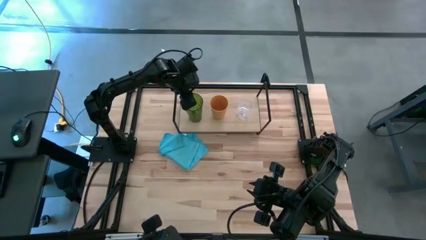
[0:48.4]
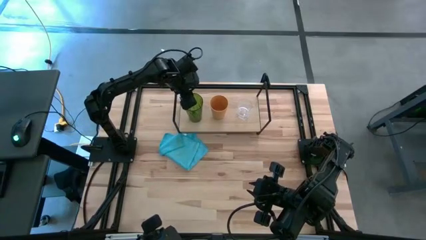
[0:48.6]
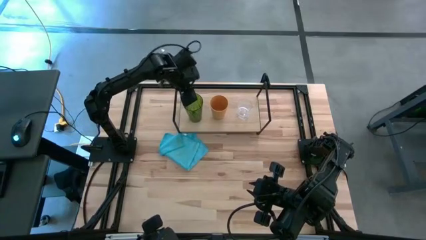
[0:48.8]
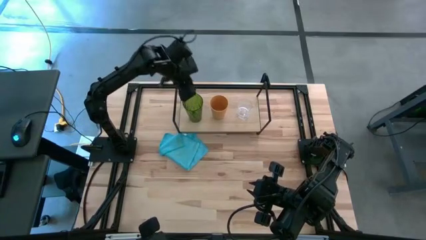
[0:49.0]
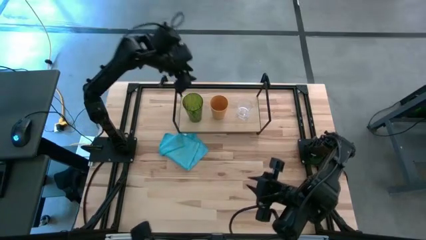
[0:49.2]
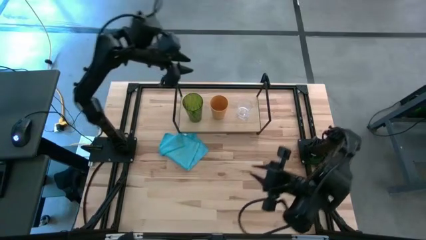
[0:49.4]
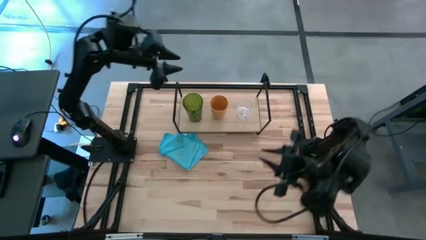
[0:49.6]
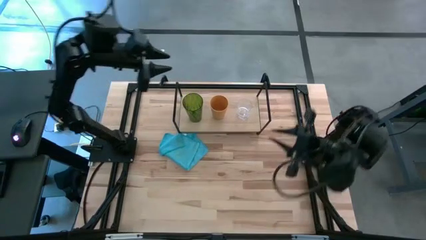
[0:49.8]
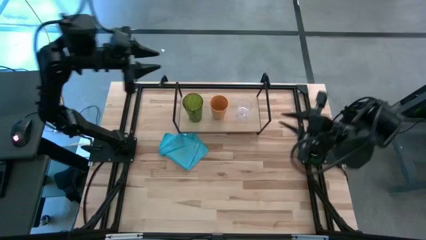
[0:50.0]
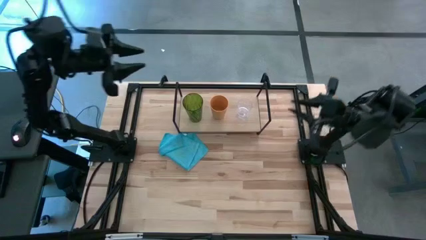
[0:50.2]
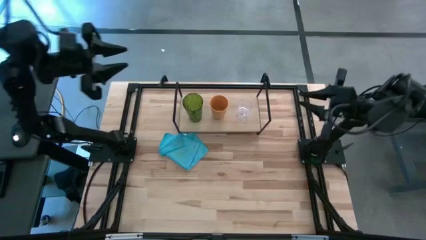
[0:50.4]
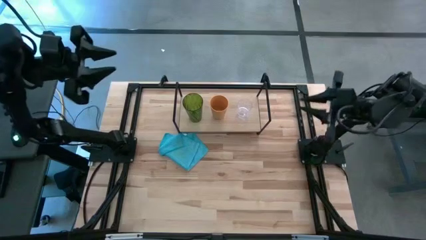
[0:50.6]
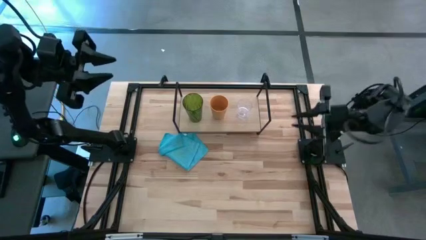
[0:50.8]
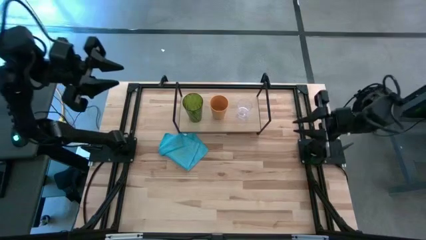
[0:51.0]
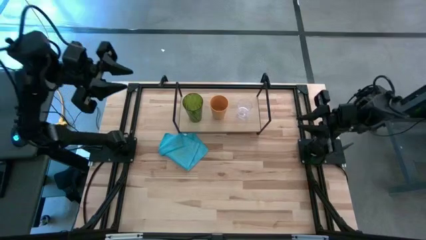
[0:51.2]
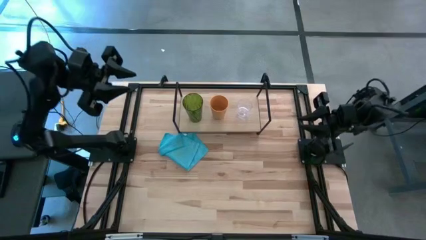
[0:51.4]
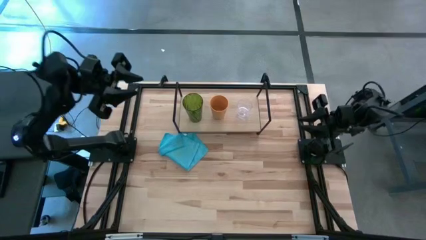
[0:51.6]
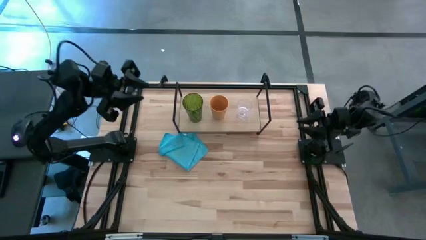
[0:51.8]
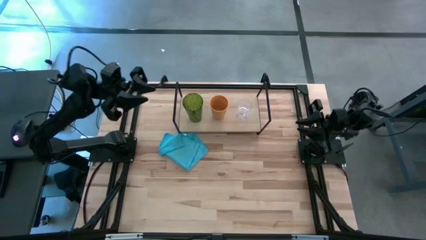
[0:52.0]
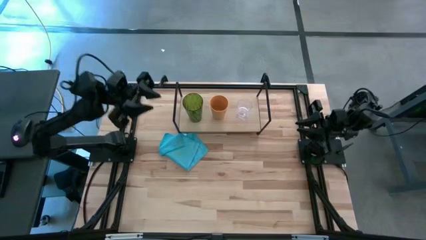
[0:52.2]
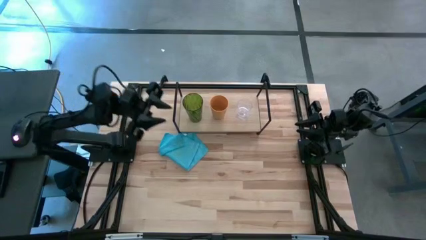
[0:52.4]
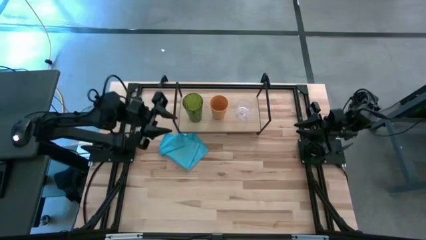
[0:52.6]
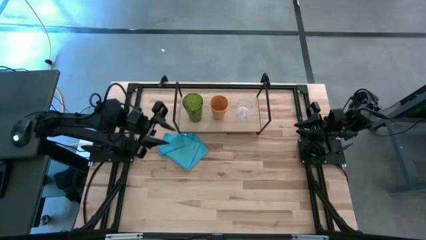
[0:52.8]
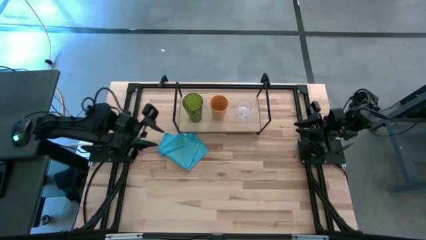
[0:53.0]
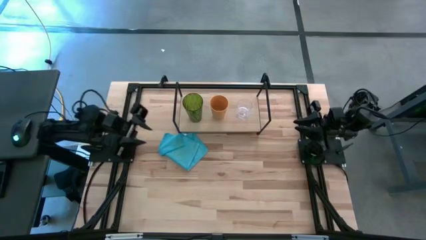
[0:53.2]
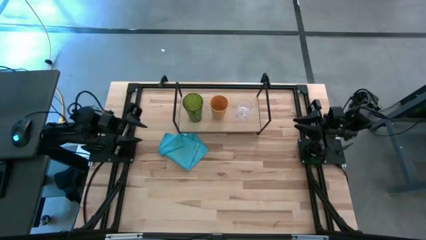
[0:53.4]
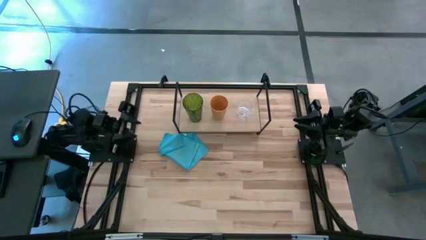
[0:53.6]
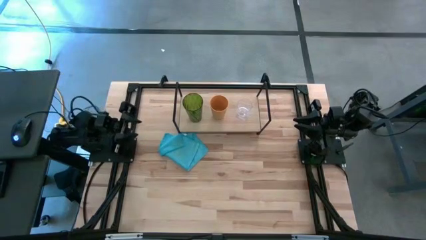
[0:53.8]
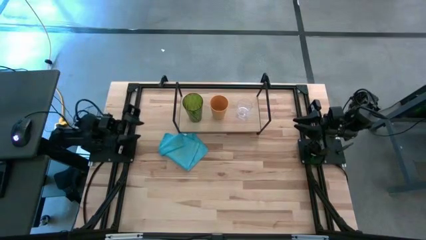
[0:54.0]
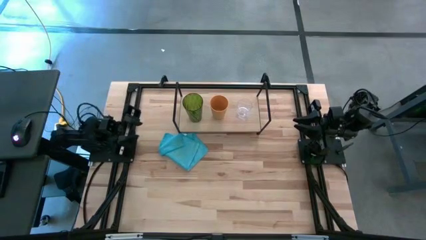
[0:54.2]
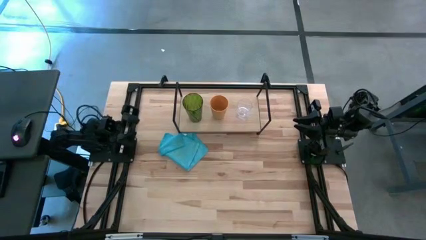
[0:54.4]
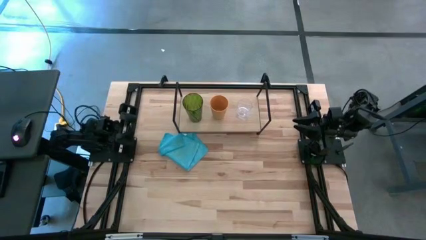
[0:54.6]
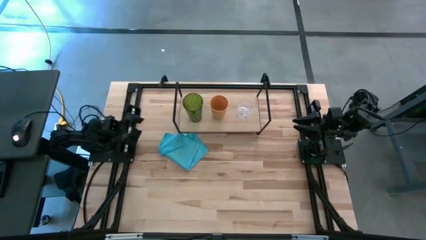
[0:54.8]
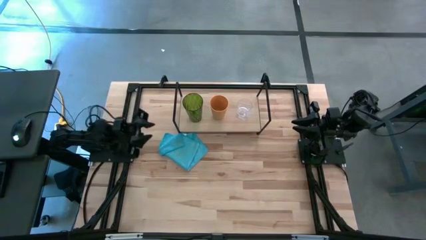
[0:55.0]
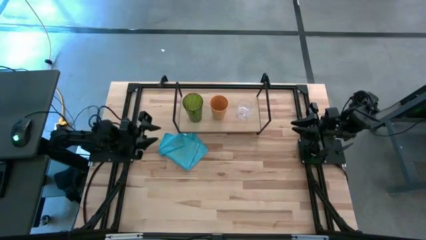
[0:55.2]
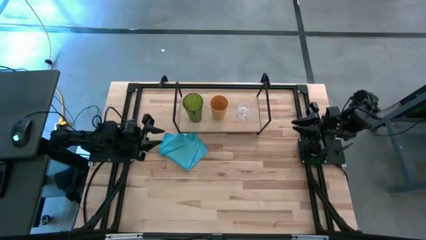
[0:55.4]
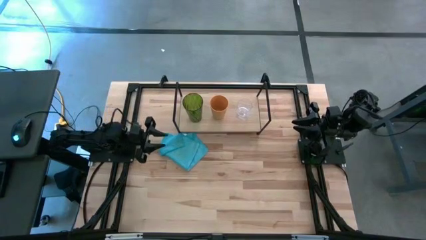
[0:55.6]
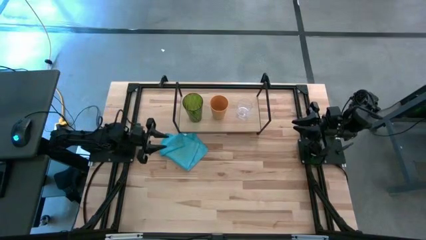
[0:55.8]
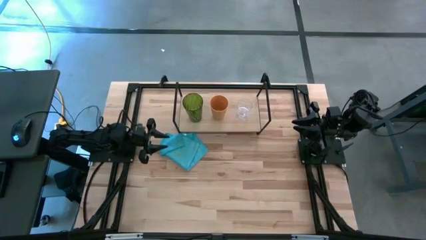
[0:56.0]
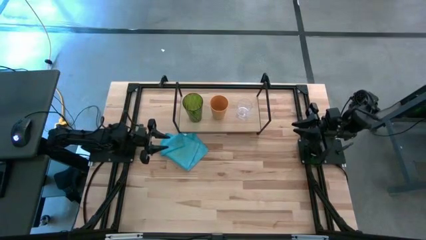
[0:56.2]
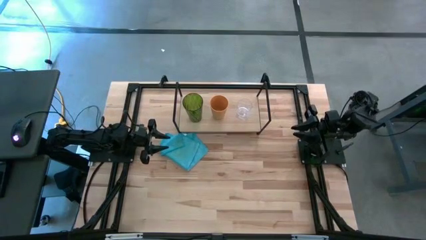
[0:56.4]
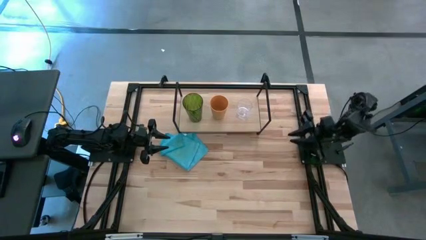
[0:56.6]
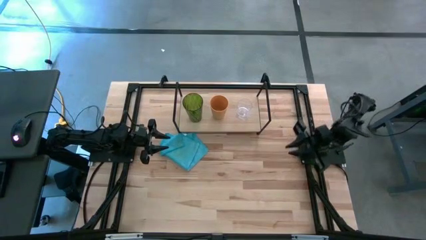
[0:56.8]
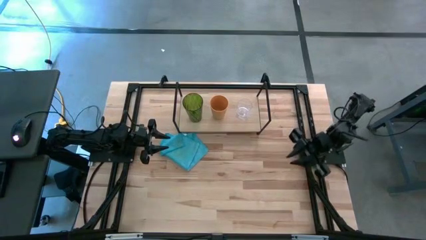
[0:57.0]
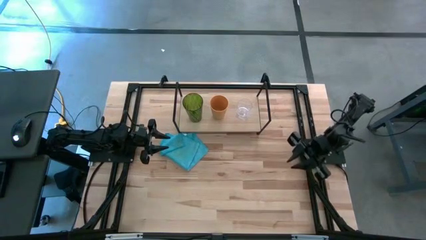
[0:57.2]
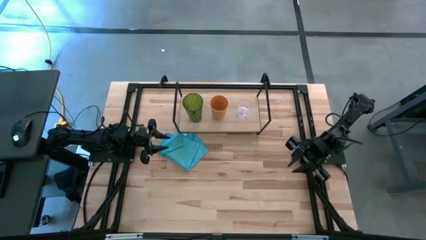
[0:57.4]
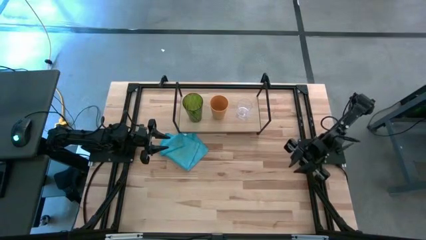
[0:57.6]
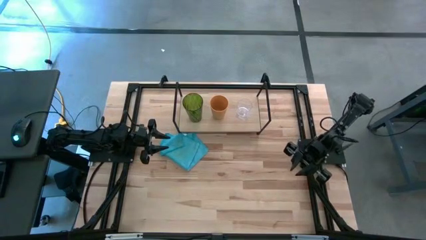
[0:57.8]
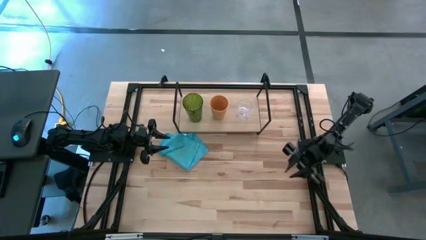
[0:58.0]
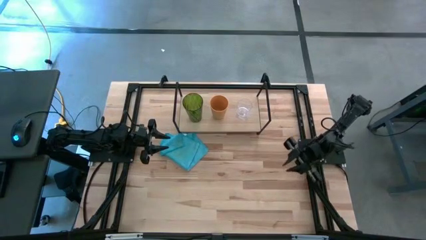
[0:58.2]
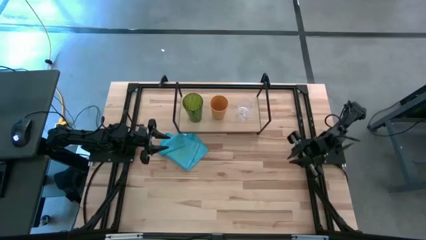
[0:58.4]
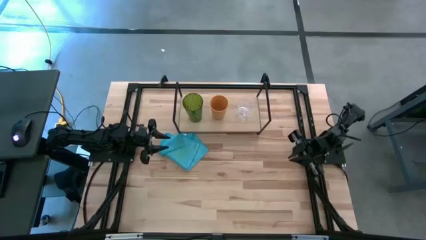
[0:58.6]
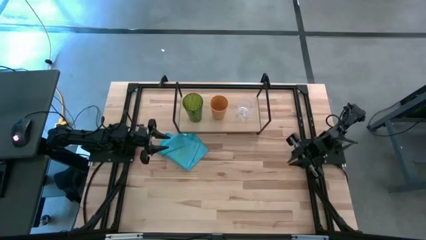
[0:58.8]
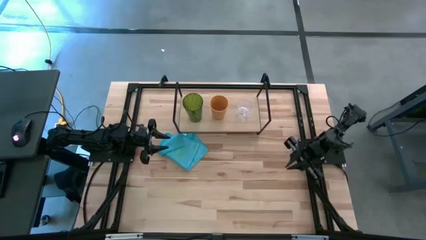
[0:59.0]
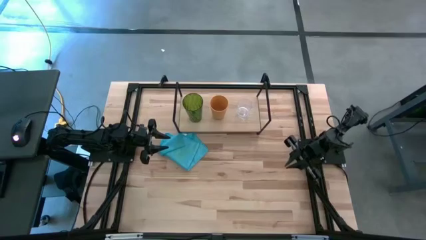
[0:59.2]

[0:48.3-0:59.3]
Task: Stack small to large cups/mugs on shelf
Return to Home Position

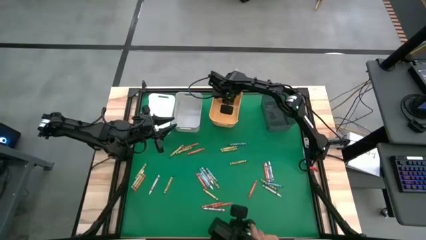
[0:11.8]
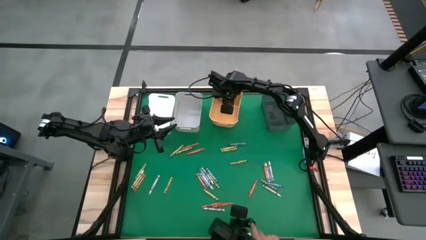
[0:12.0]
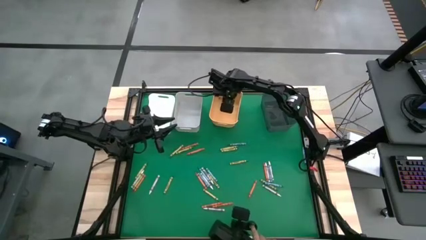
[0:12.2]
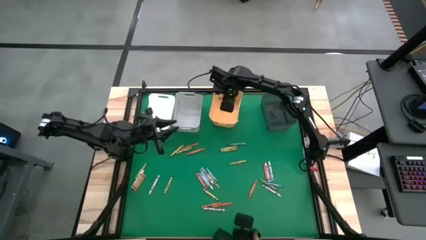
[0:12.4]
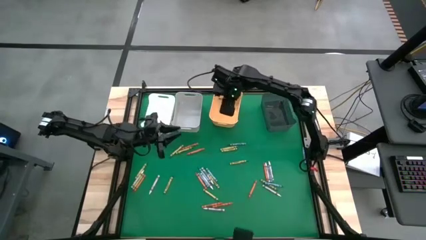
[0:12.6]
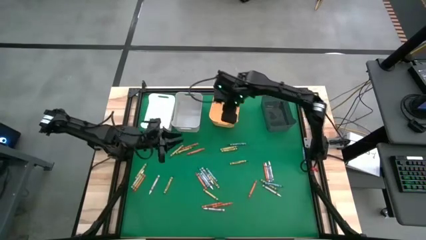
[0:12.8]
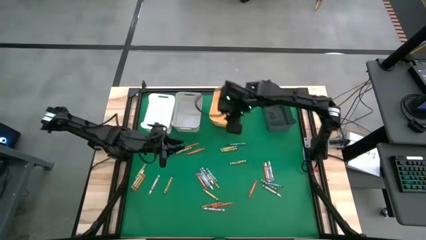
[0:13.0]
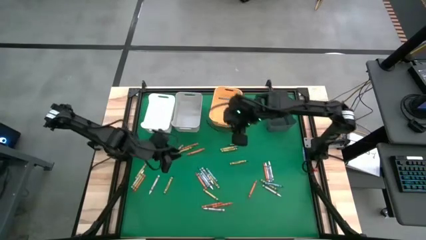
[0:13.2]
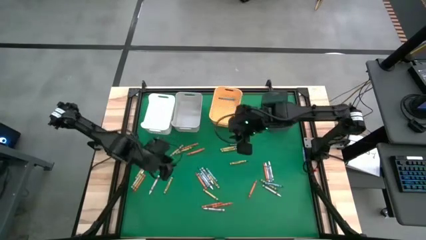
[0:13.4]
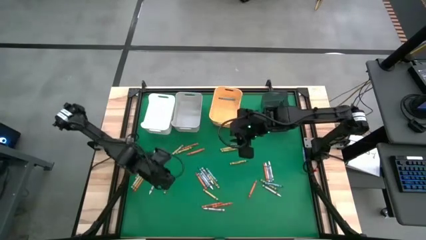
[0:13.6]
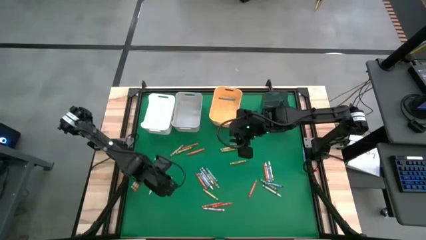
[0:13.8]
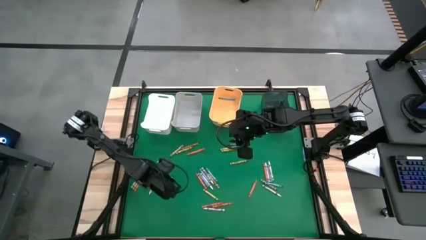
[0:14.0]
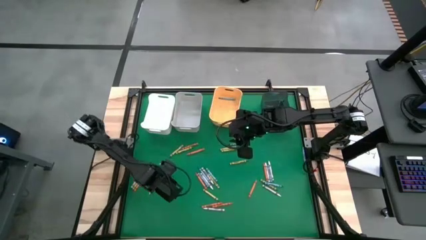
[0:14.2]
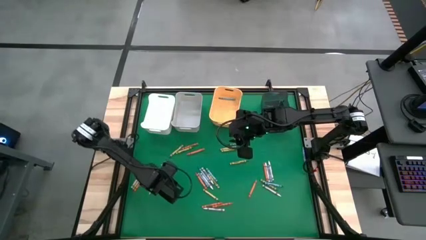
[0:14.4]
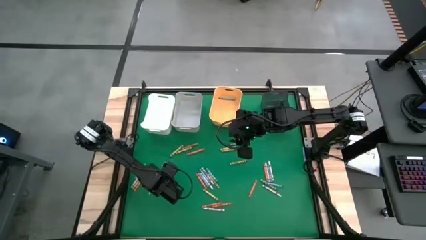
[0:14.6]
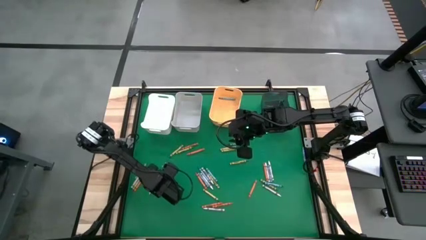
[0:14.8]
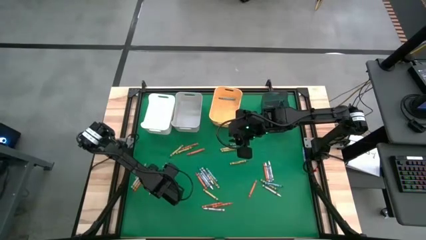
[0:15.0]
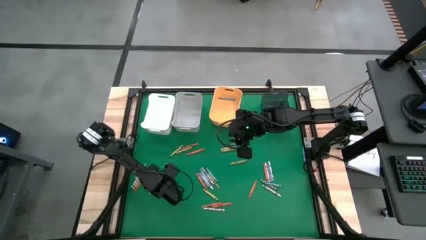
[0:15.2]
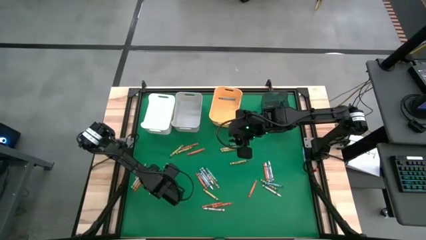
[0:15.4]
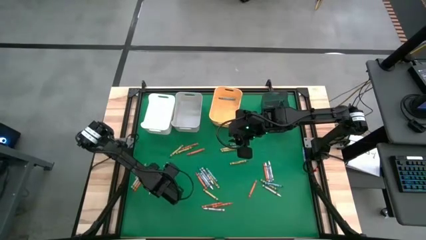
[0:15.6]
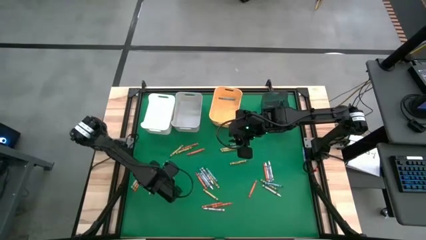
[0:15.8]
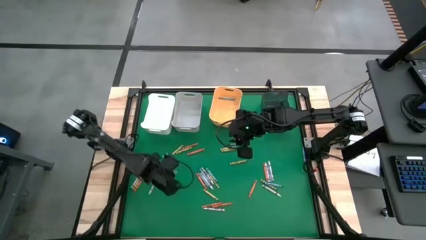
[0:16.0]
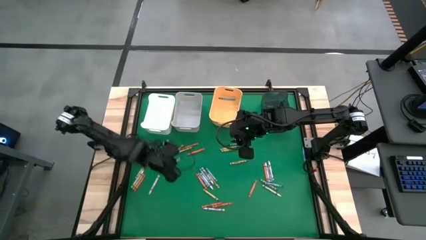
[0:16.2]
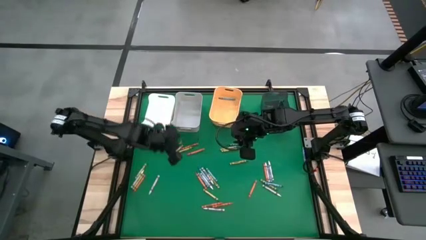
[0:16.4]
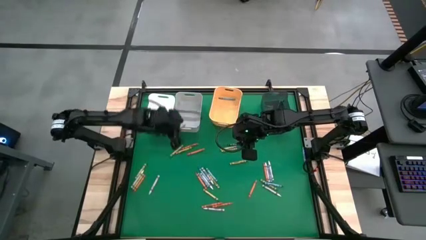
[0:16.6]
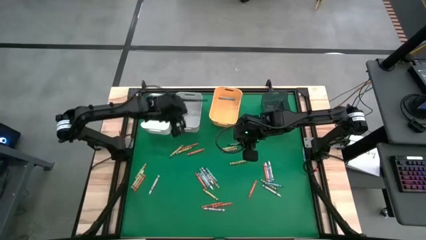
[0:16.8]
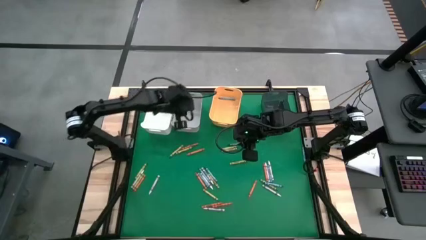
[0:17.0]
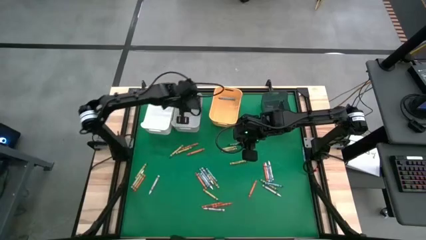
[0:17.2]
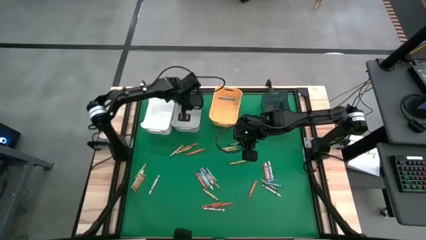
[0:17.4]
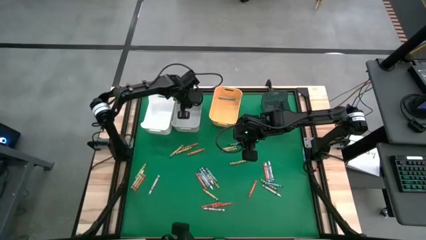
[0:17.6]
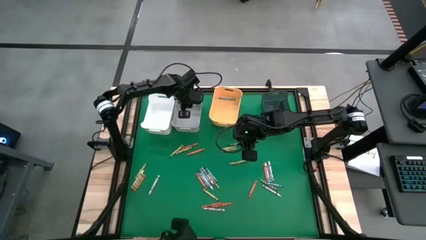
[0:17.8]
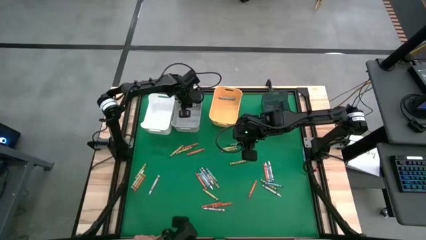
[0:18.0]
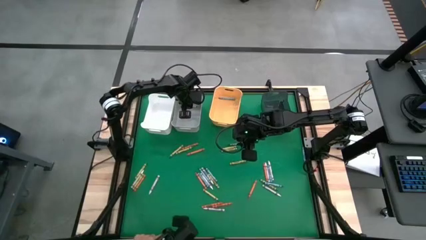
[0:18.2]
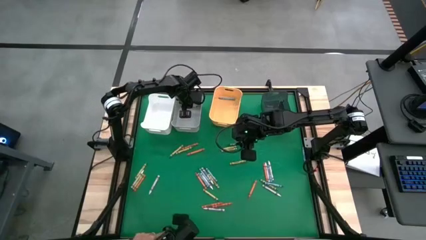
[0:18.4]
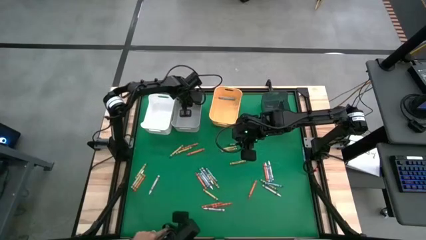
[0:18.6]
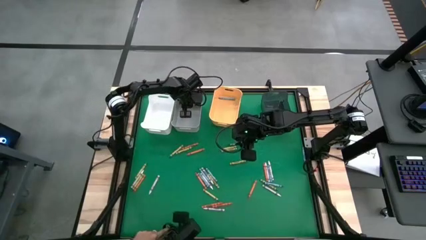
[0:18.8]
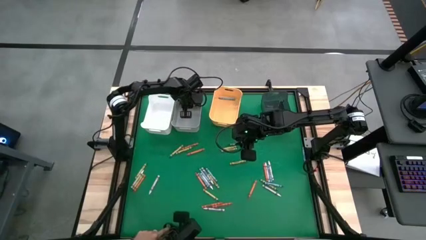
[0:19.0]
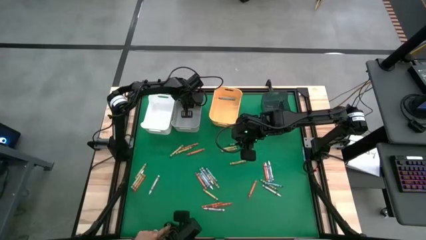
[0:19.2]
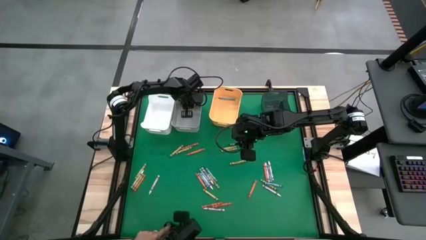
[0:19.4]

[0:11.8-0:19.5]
Task: Sort crayons
Put the green crayon into the gray bin
